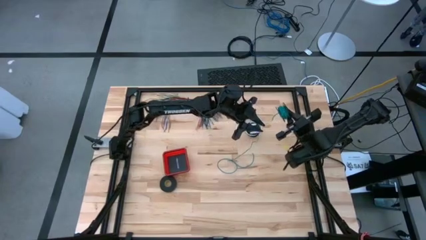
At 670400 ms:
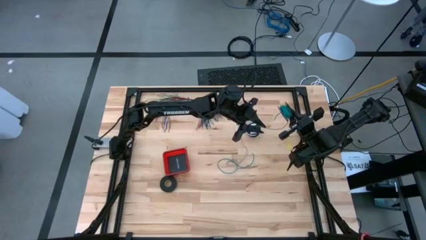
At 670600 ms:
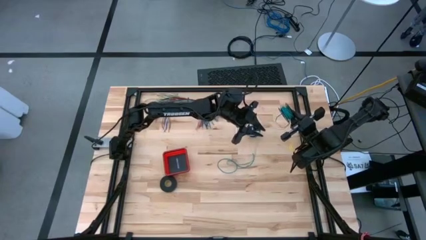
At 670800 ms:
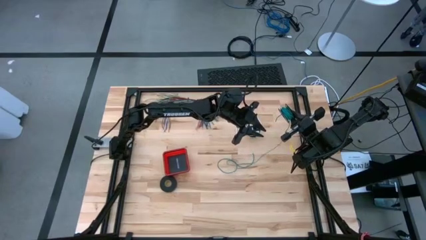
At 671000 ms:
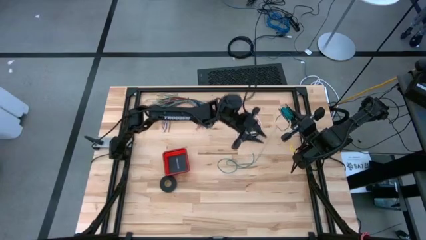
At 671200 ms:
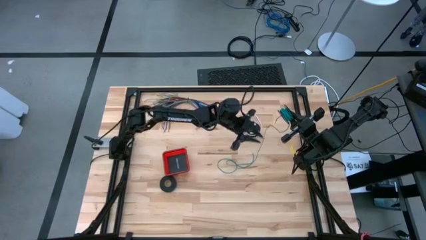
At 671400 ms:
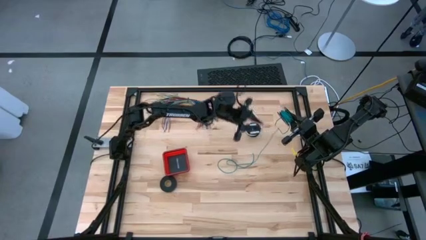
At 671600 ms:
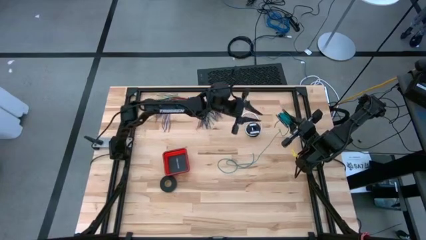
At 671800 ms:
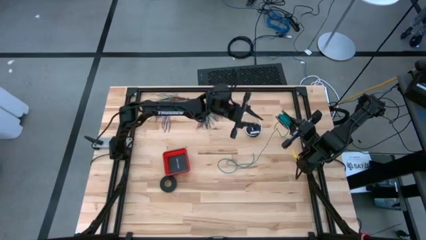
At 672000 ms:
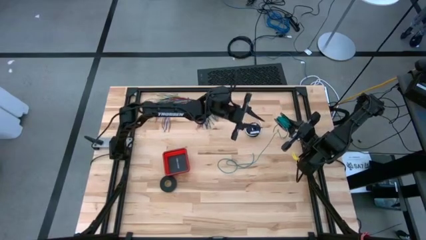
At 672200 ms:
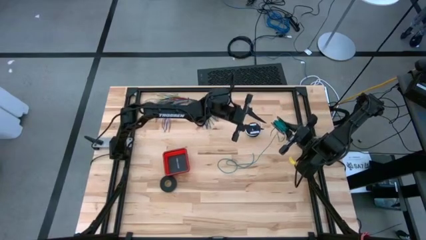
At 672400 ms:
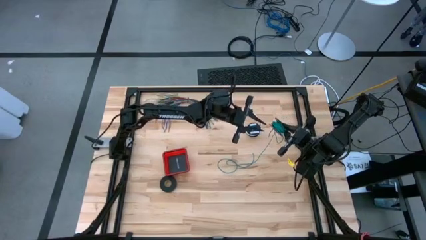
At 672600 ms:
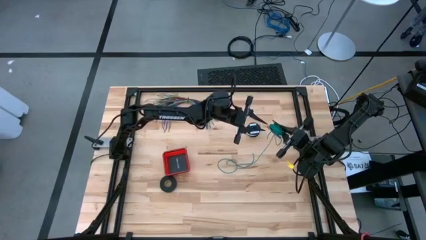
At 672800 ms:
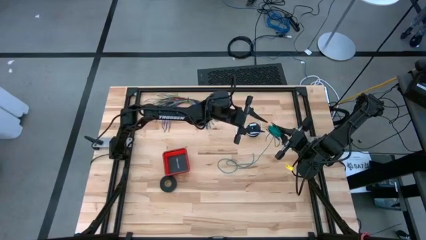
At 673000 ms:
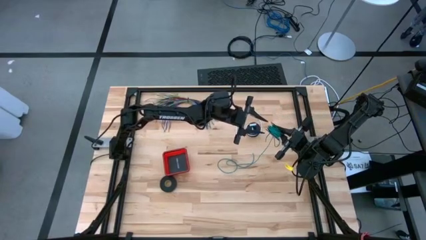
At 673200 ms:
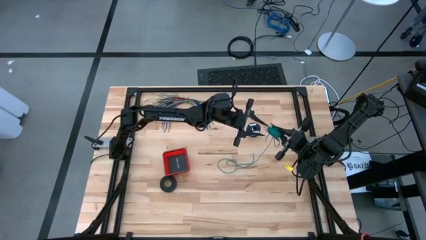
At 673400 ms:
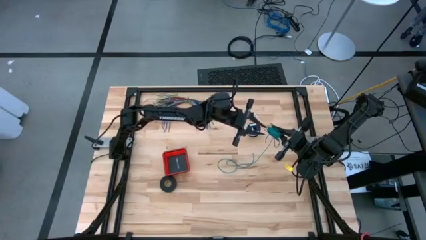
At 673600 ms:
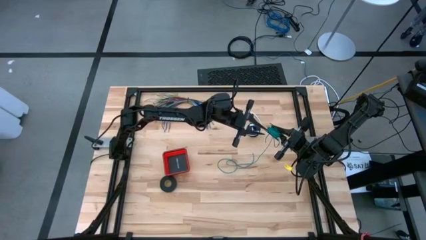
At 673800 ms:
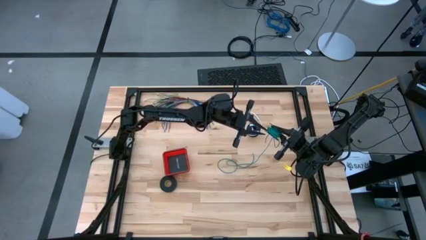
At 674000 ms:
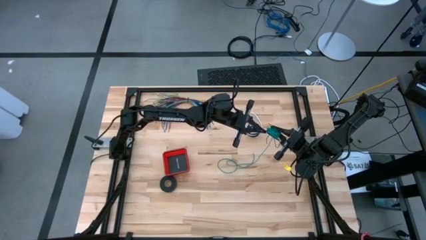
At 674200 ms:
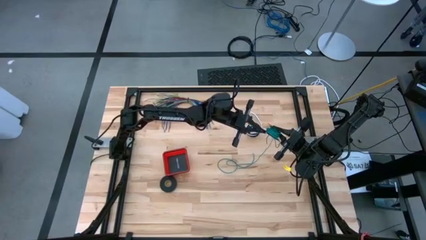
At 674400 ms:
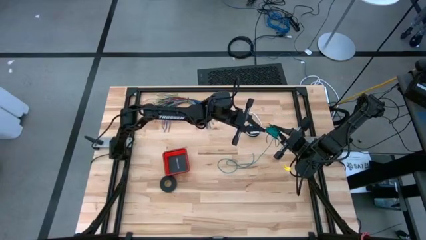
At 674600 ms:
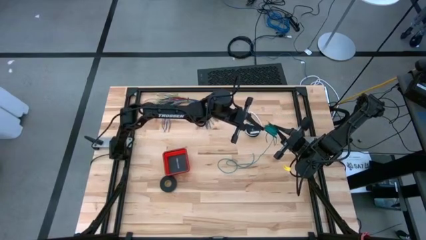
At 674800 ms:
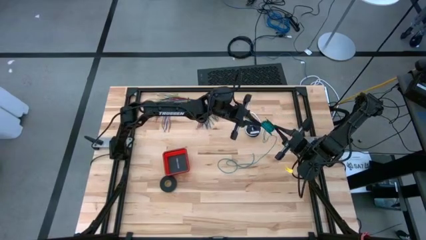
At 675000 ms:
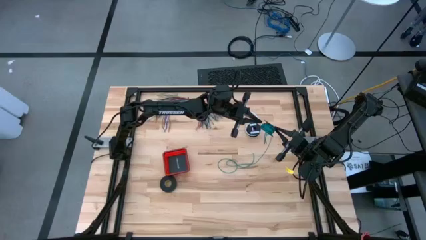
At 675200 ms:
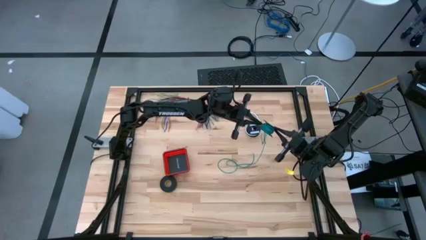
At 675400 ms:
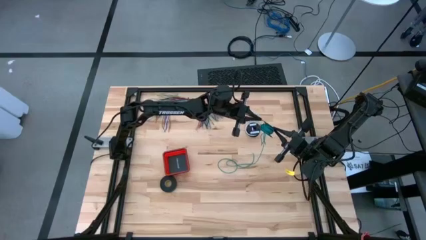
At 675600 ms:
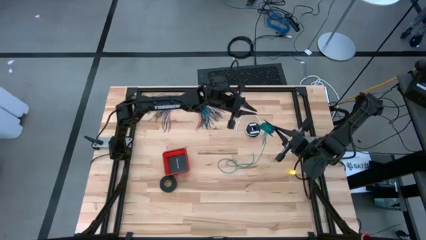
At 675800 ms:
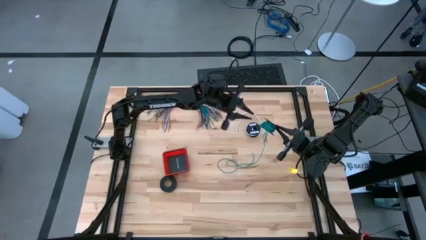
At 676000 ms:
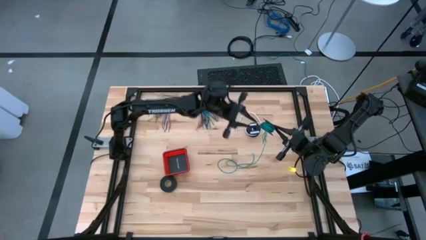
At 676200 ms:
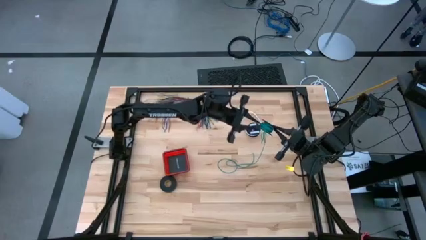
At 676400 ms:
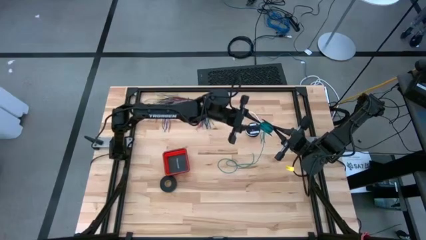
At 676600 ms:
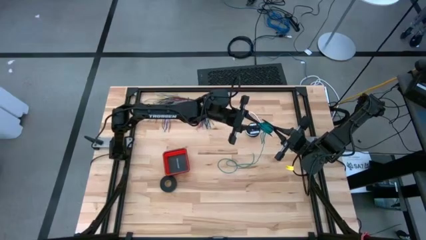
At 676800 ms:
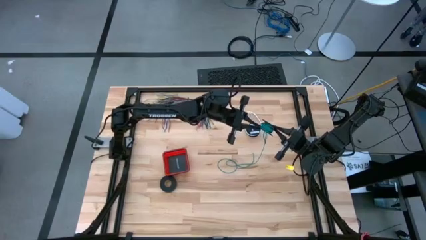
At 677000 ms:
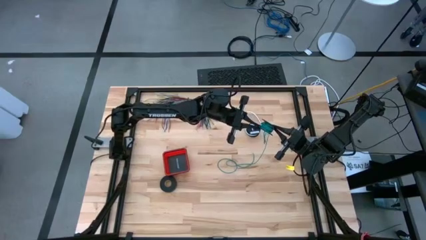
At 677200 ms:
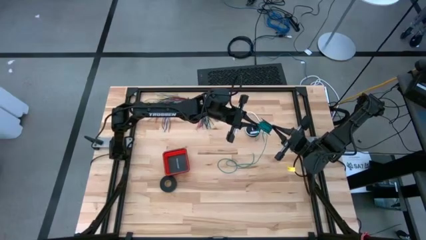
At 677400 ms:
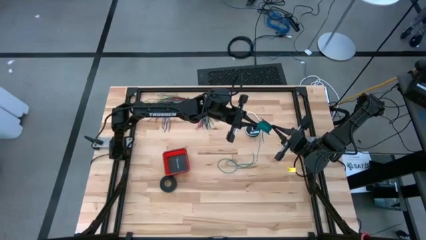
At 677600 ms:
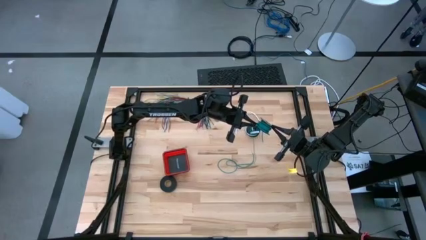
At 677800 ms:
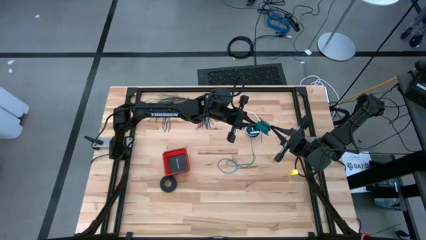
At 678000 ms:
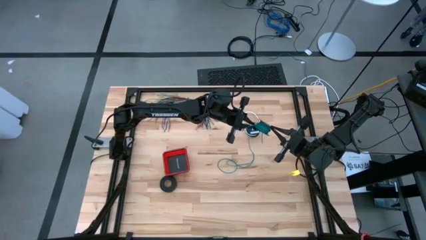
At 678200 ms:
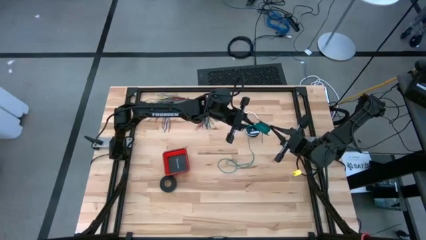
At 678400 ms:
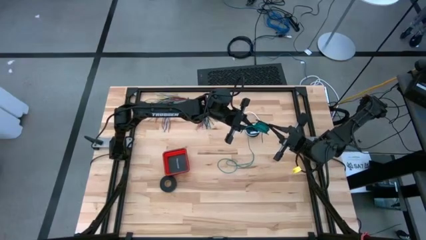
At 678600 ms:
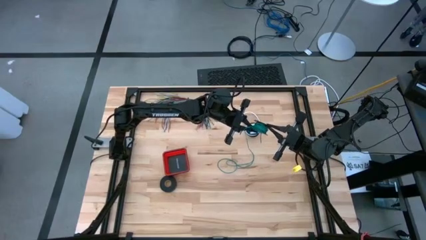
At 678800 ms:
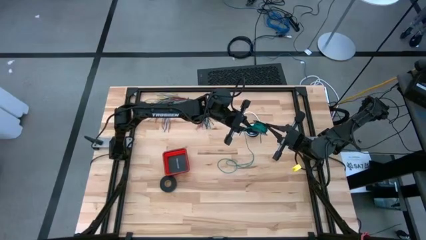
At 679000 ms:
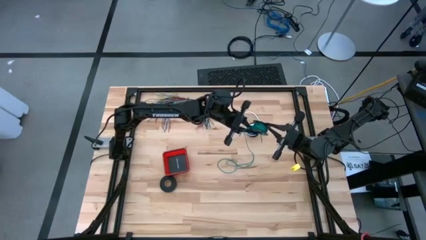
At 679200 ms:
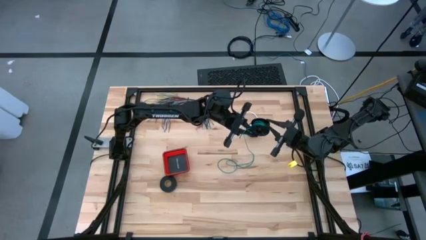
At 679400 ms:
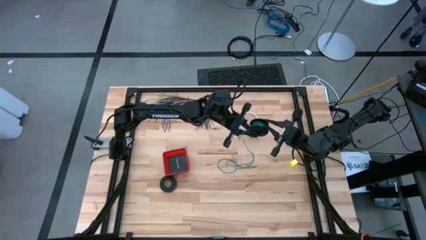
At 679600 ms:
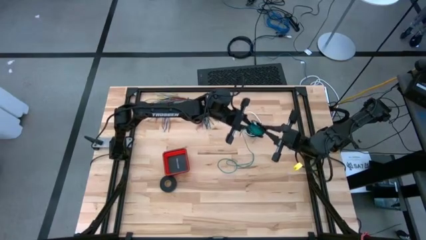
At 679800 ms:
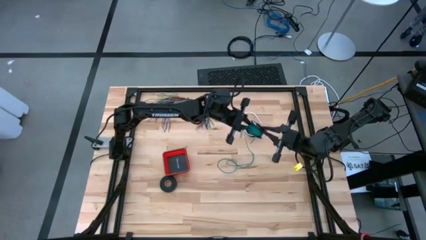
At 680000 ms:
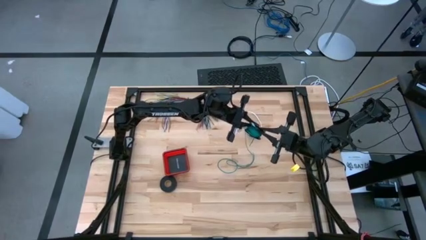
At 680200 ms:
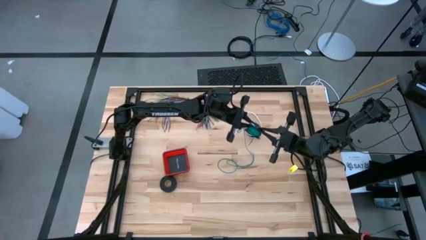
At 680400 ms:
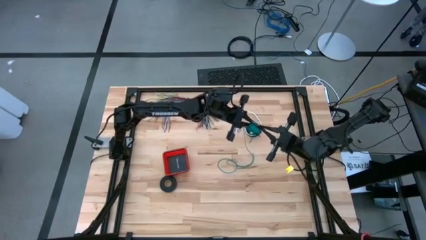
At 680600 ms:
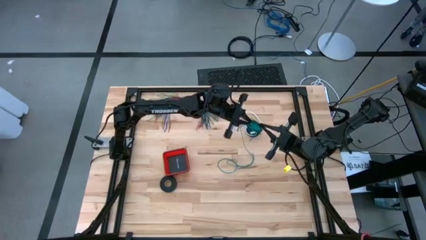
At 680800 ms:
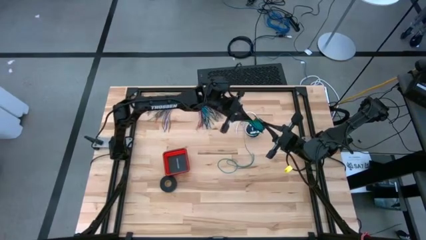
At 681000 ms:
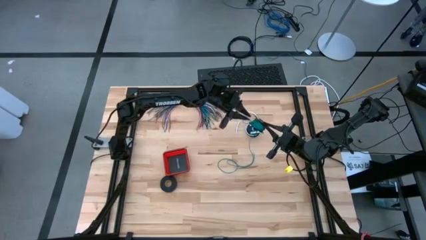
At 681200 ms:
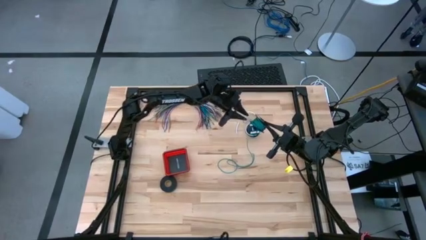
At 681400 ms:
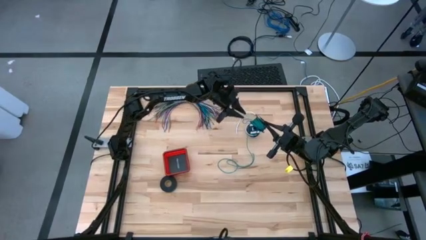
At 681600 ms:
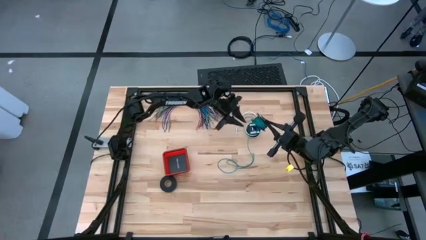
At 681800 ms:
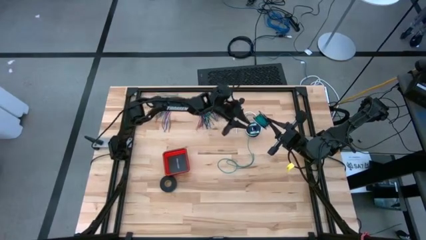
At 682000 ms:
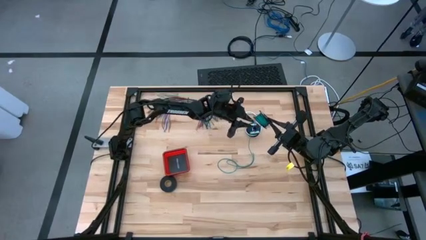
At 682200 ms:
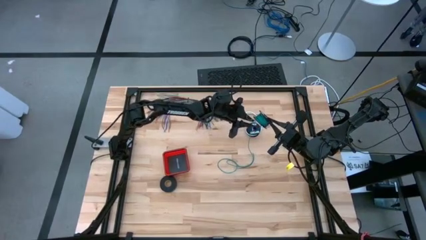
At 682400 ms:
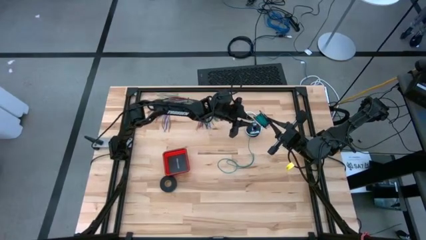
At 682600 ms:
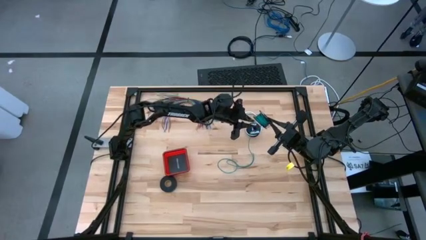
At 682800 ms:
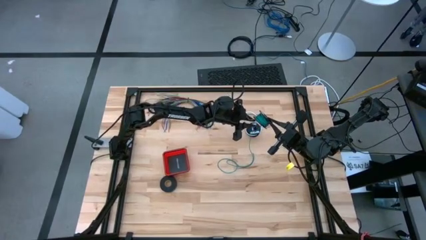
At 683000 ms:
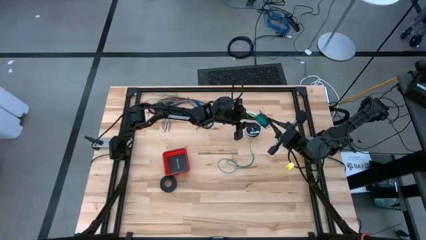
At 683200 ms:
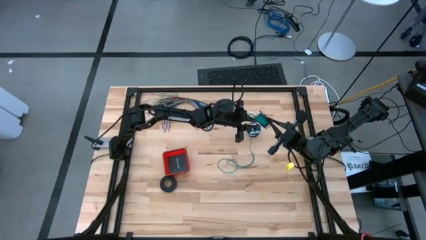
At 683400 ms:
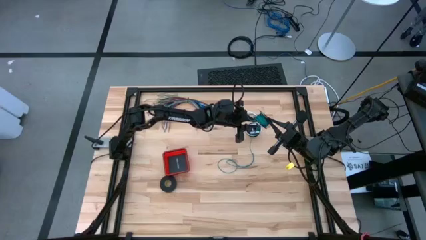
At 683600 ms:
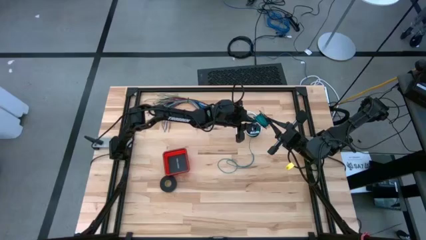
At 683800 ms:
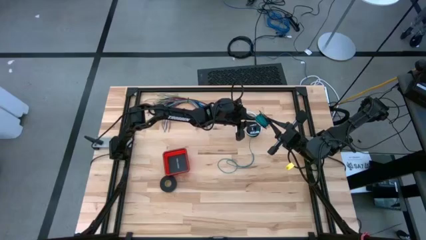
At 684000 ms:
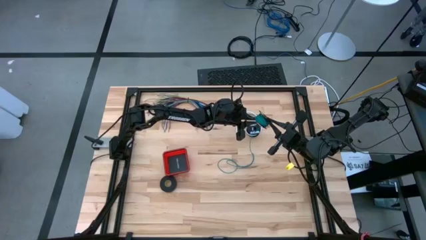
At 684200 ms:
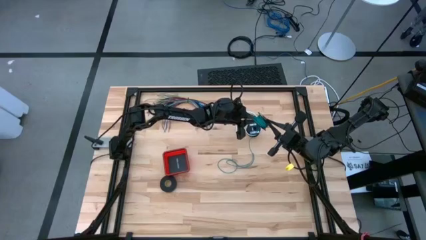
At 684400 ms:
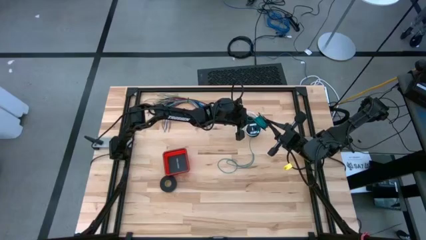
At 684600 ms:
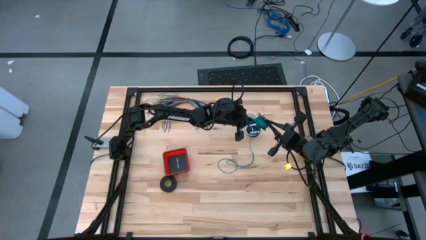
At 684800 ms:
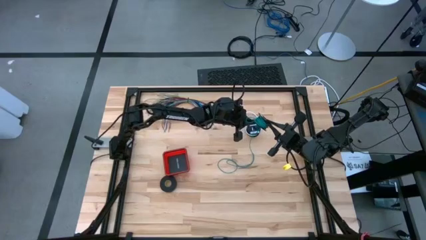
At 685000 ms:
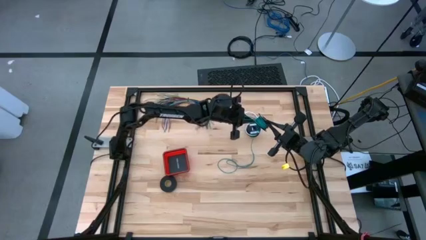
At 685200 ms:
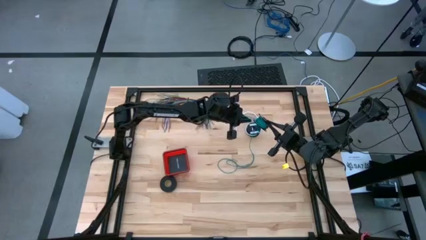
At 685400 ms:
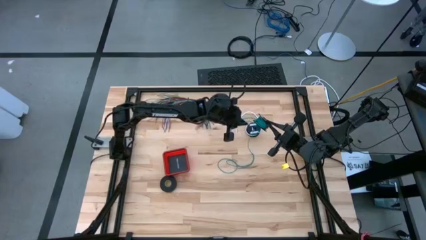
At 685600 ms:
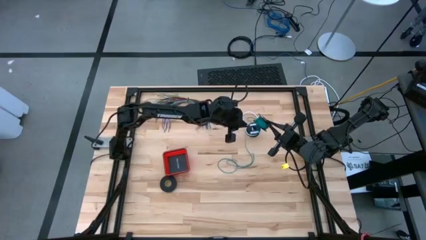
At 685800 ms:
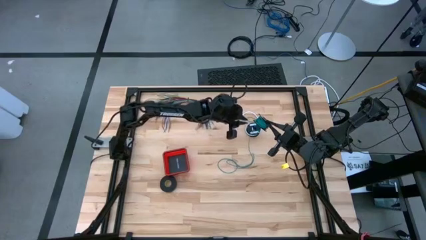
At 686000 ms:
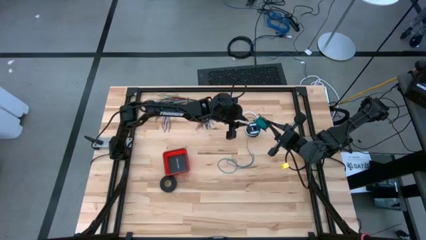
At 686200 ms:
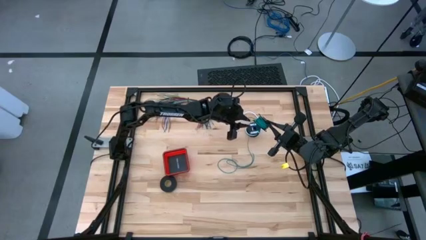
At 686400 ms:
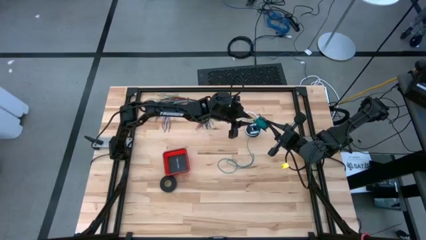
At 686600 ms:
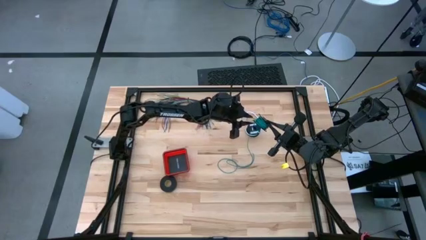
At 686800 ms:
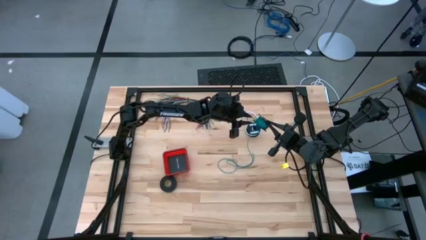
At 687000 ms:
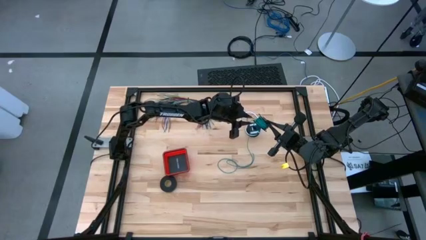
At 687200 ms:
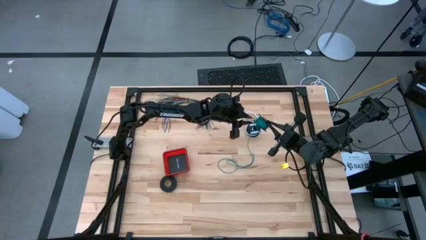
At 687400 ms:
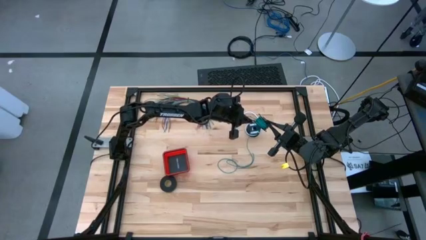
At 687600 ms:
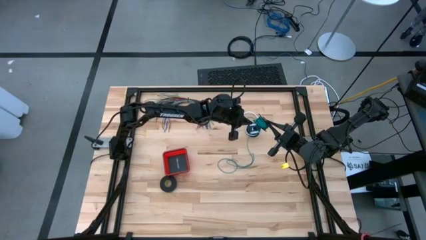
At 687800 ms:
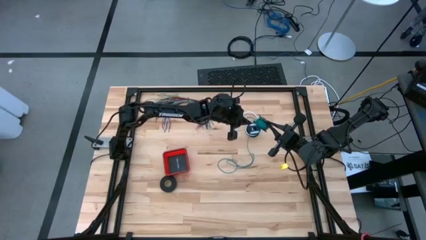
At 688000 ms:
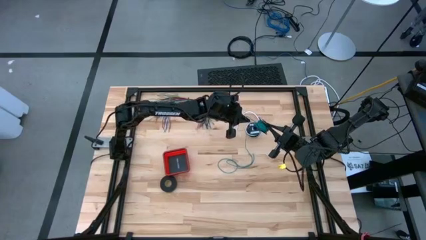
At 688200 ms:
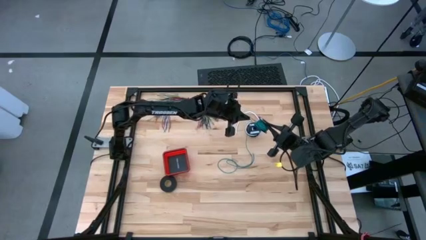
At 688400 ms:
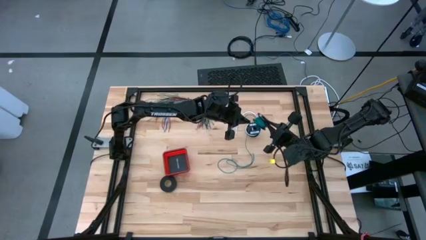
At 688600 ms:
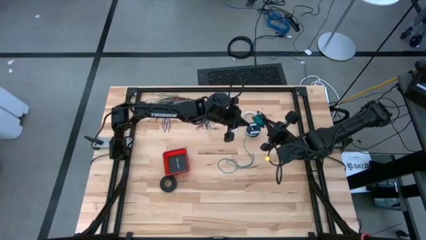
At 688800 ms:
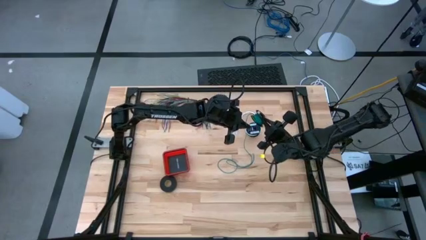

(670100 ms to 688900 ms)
Task: Coil cords
Coil the green wire onto the spool
